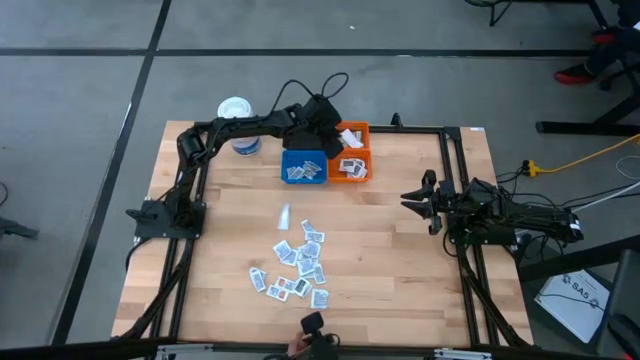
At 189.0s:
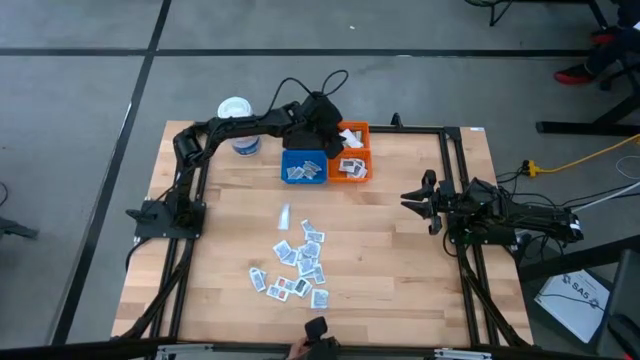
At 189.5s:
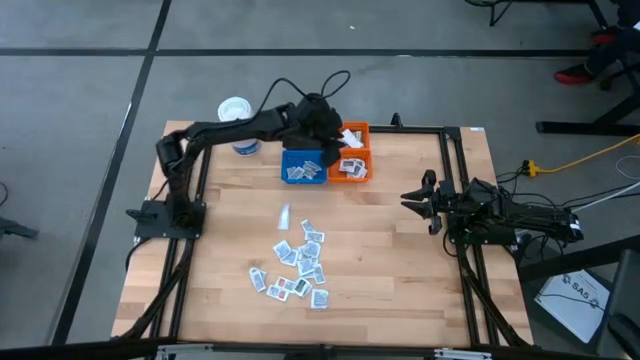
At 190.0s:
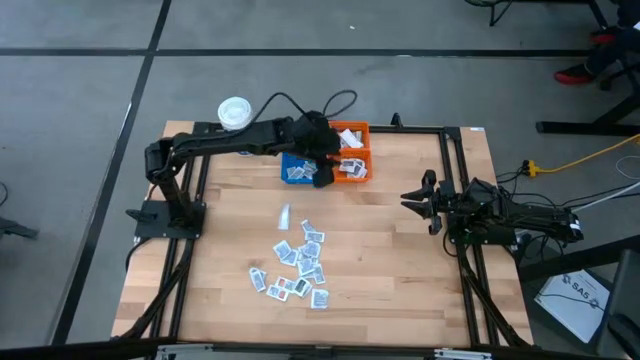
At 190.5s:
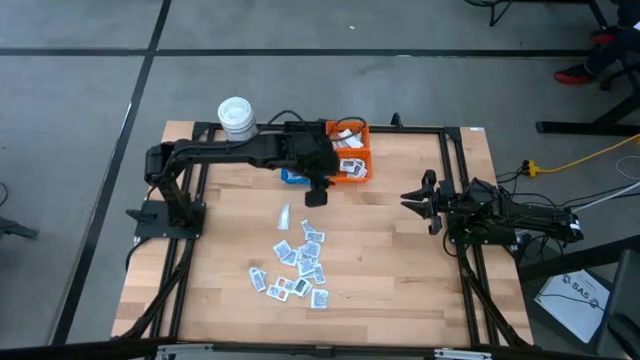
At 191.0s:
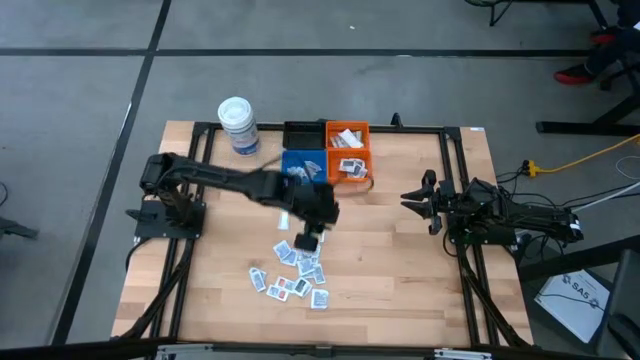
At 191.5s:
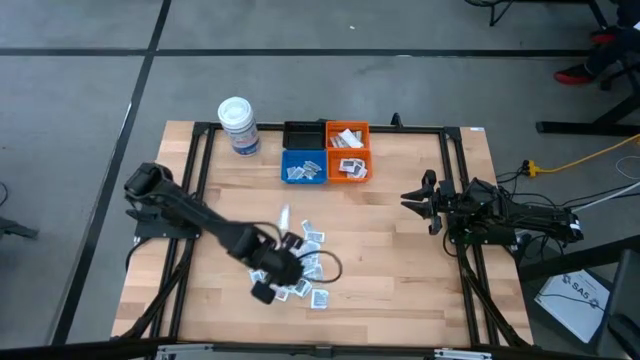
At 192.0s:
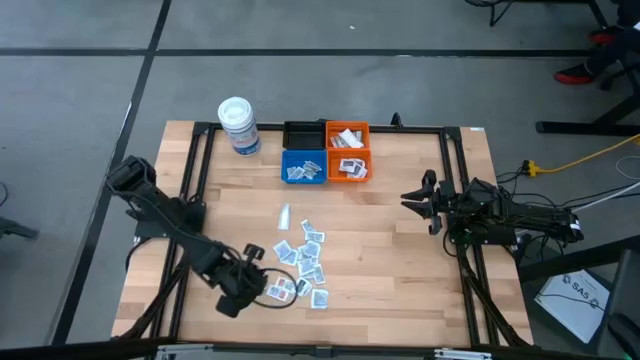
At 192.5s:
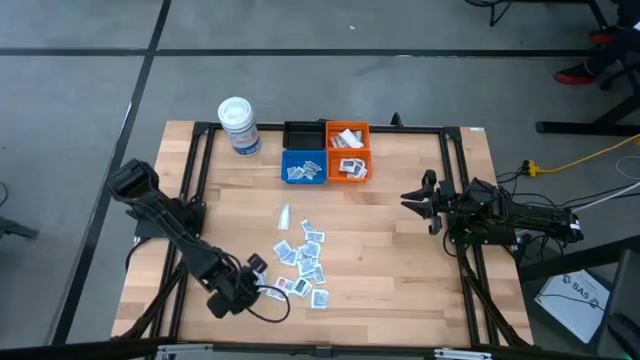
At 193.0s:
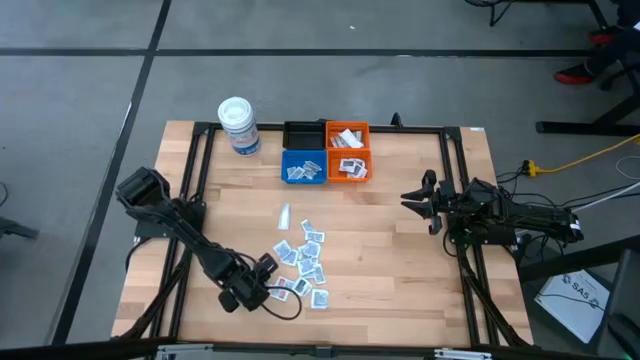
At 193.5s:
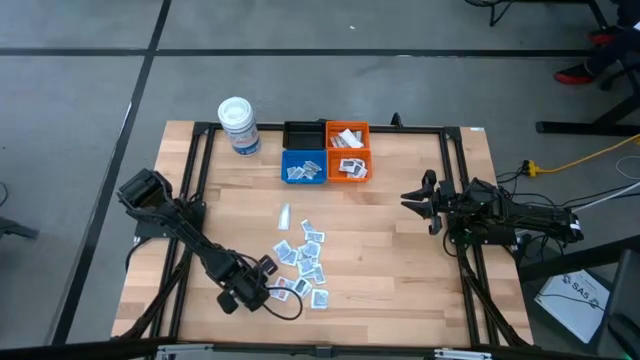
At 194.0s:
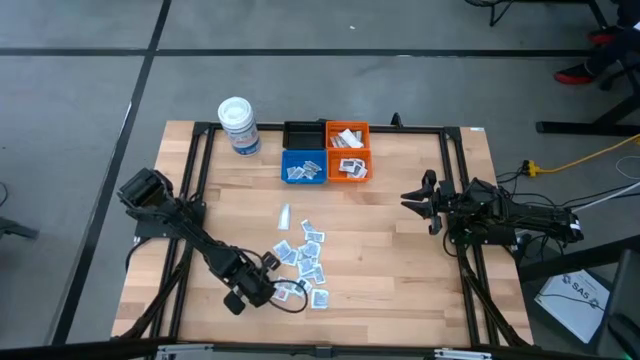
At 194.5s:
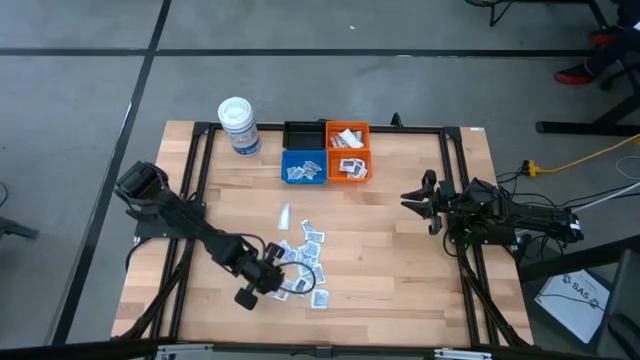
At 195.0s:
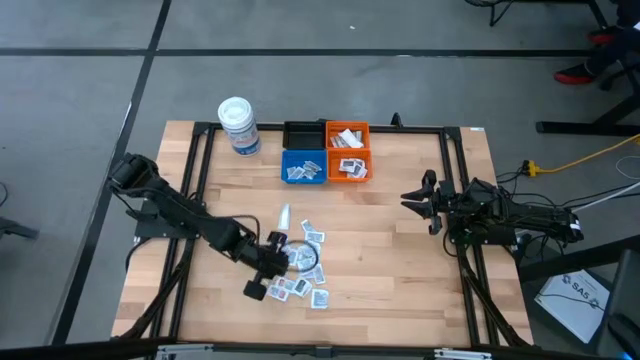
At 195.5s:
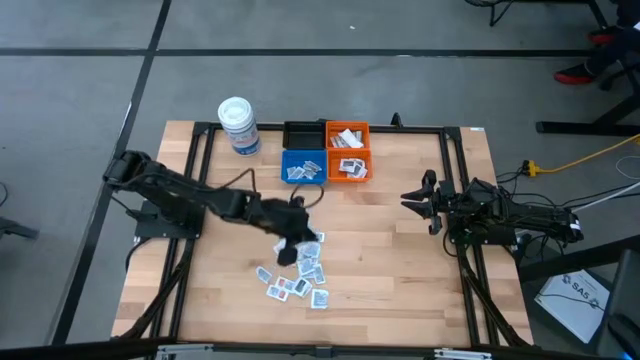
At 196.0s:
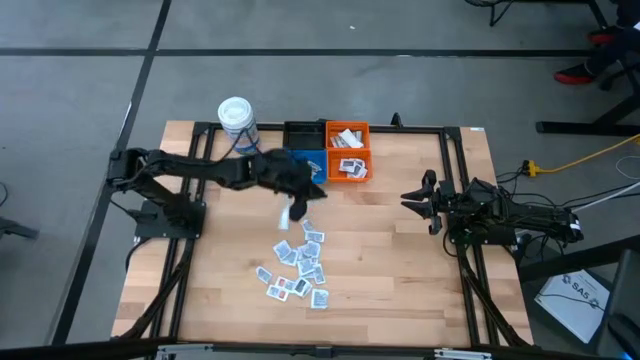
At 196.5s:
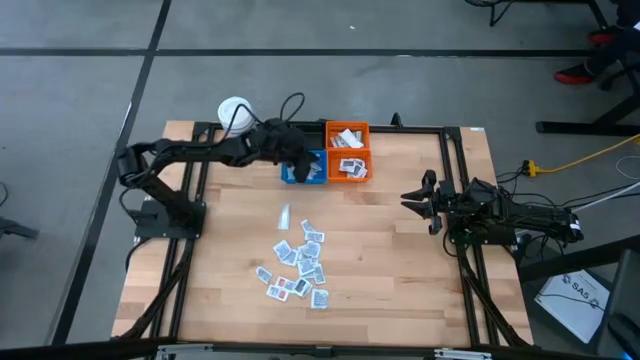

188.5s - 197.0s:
Task: Pick & Place First Aid Supplies
Put the ointment pack into the blue bin

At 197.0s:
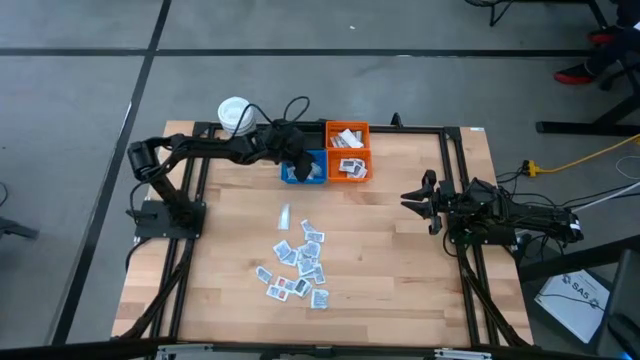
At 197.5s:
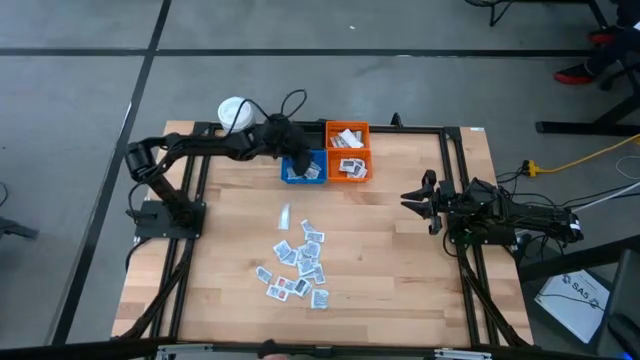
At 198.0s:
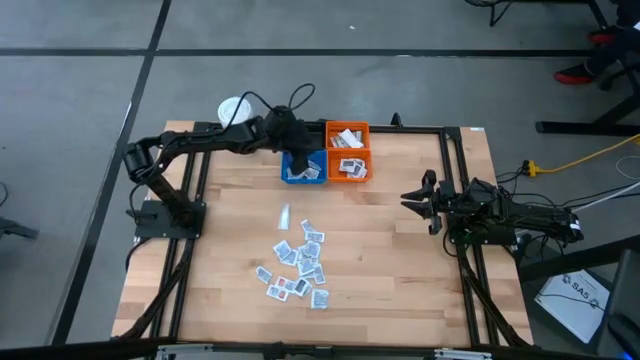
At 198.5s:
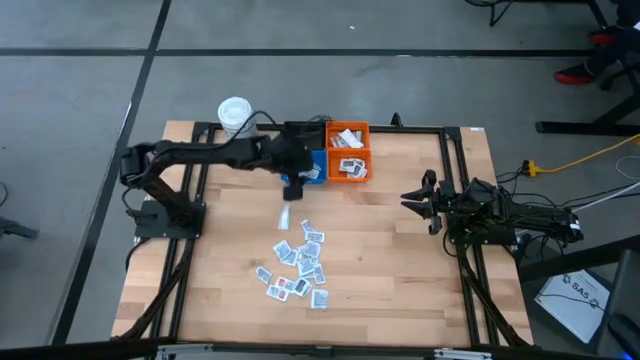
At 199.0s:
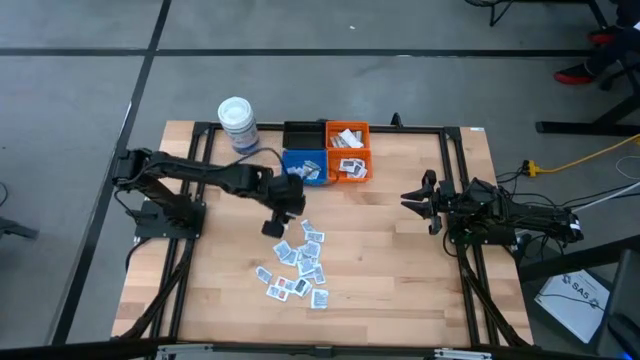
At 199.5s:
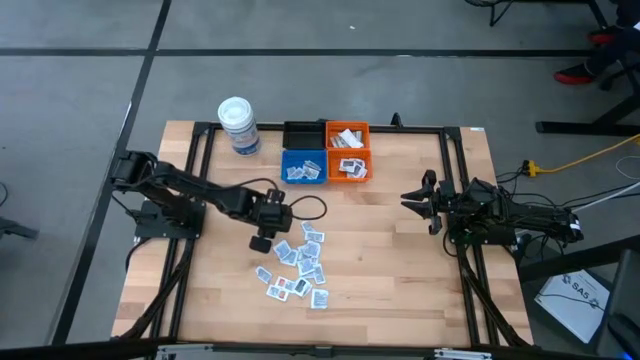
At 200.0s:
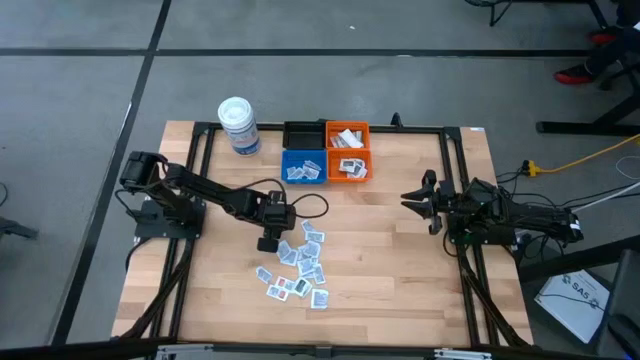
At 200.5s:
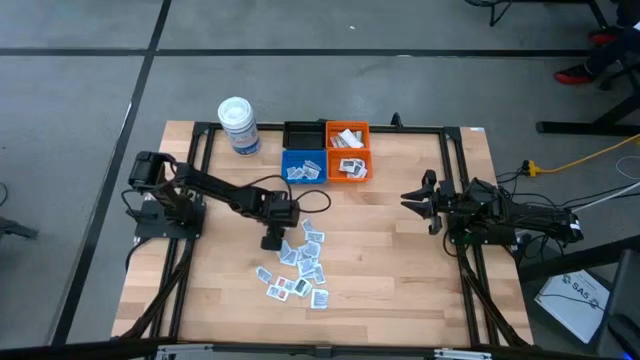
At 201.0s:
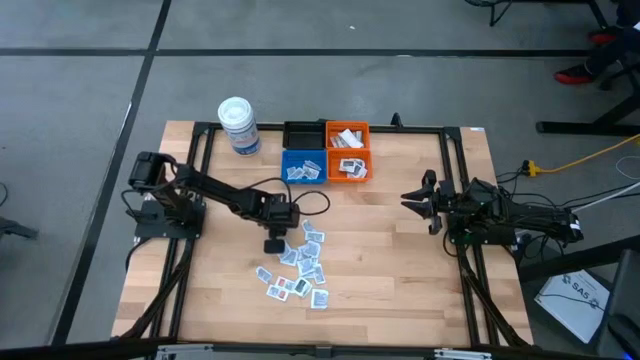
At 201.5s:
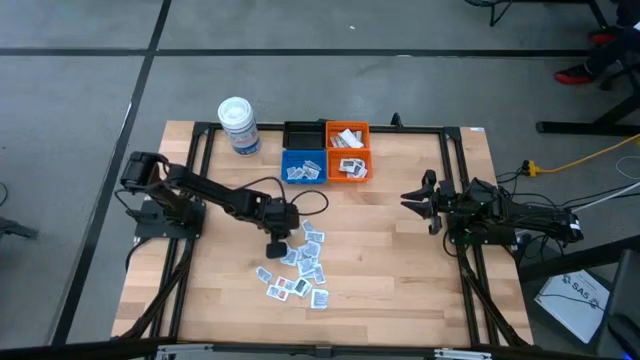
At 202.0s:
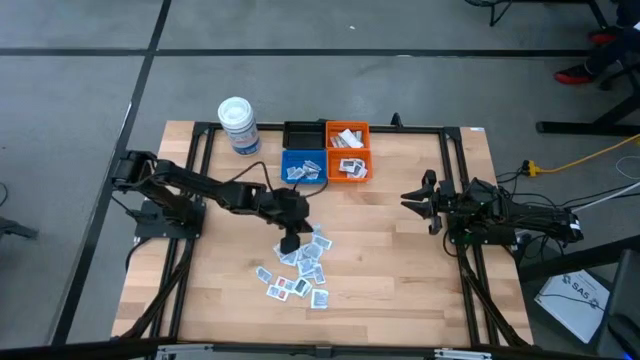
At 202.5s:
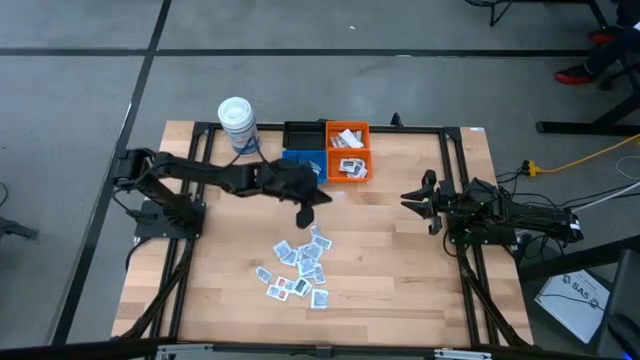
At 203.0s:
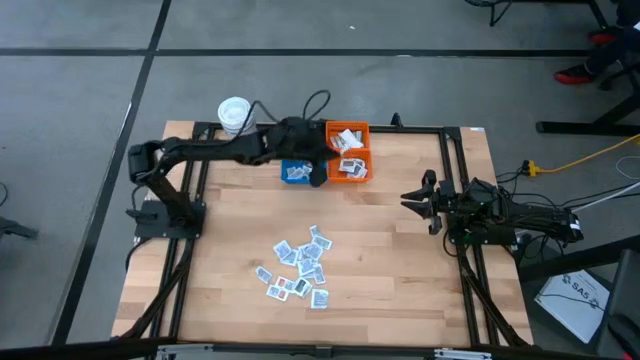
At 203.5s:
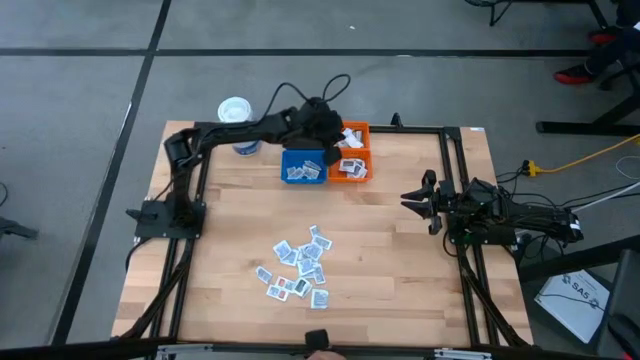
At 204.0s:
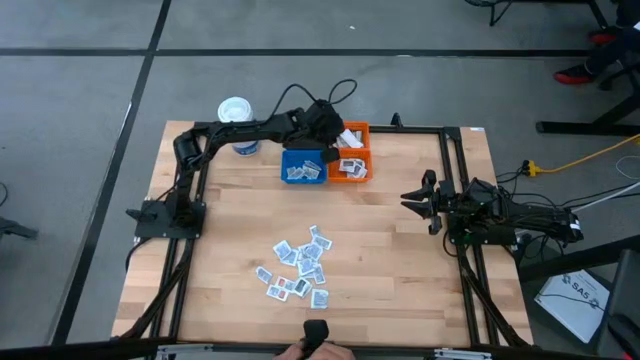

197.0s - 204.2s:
Put the bandage pack into the top orange bin

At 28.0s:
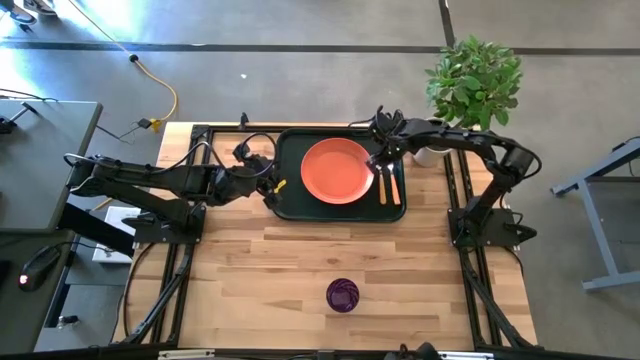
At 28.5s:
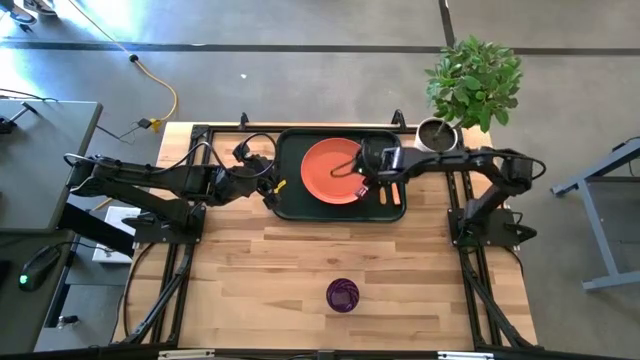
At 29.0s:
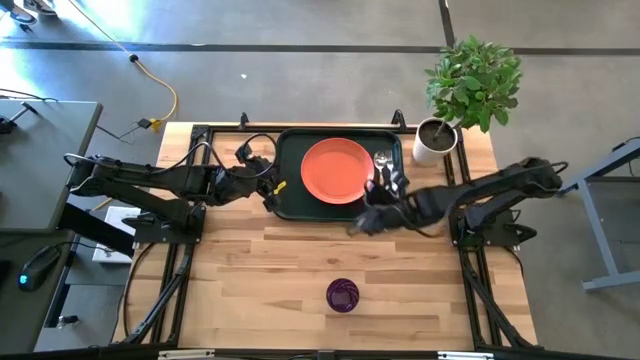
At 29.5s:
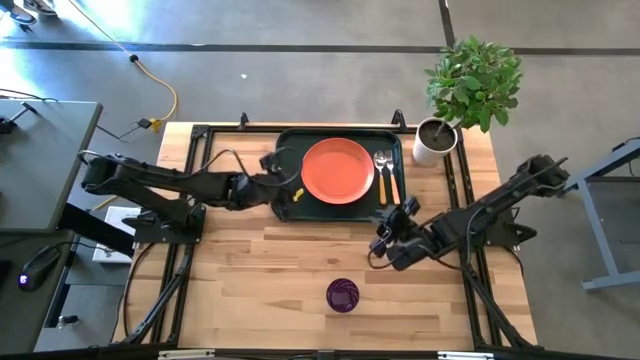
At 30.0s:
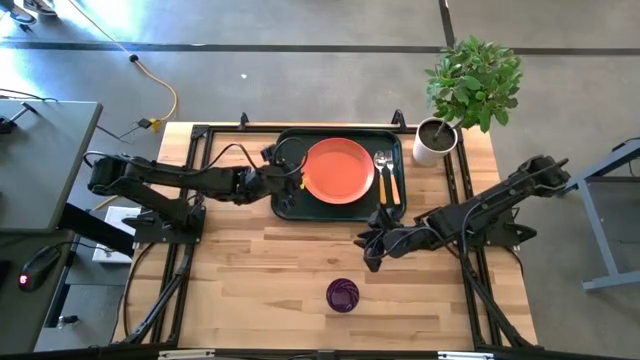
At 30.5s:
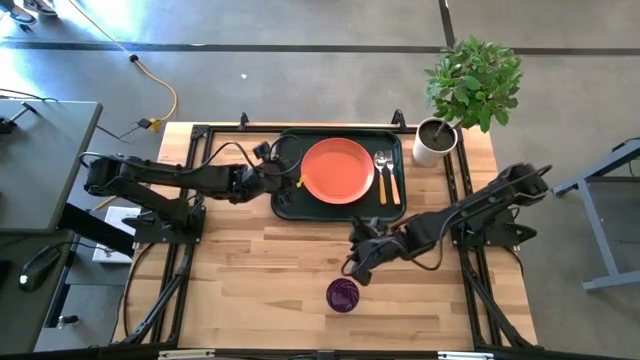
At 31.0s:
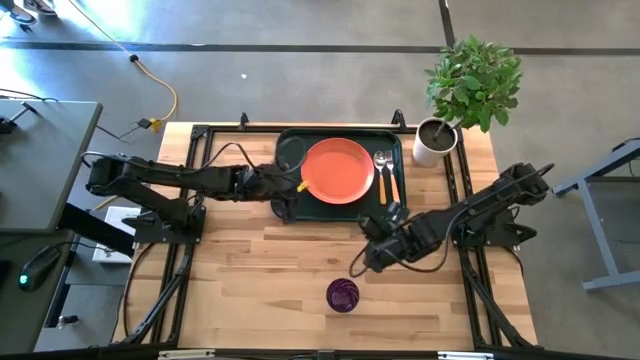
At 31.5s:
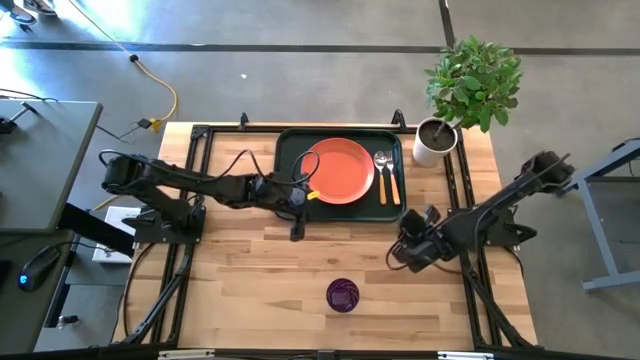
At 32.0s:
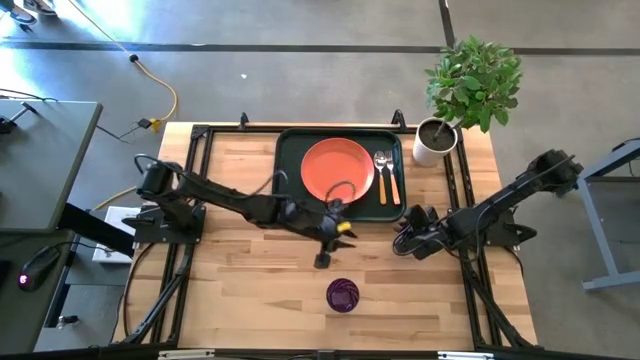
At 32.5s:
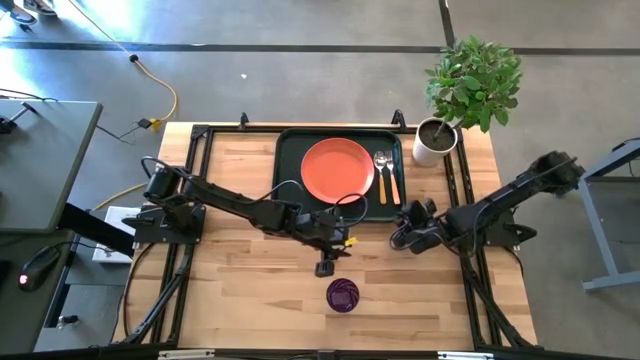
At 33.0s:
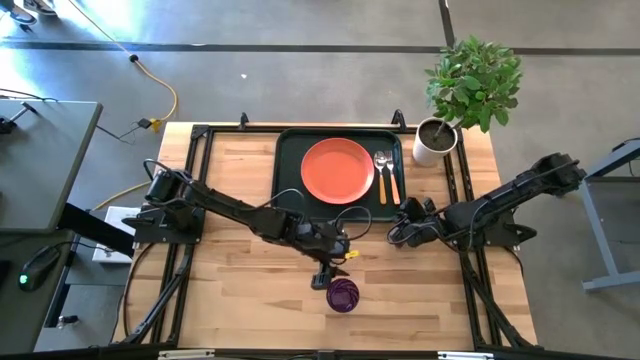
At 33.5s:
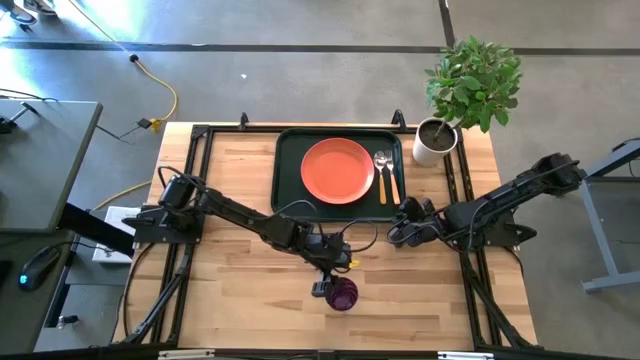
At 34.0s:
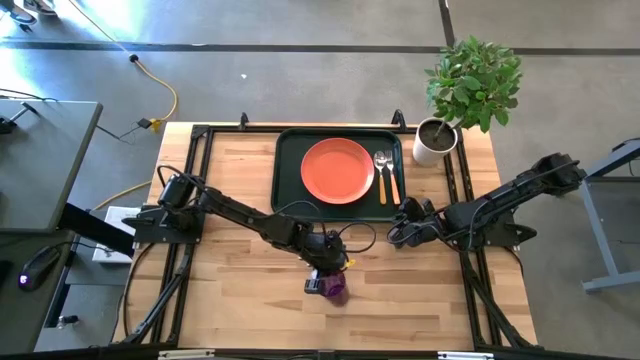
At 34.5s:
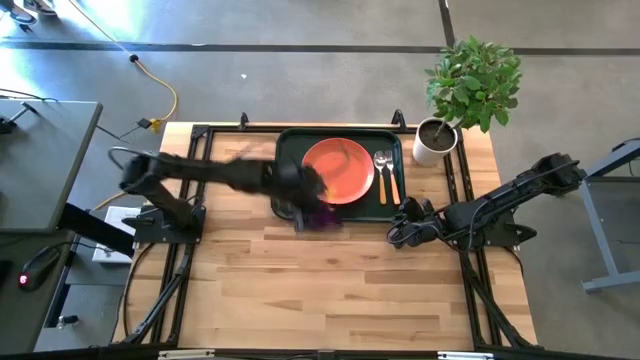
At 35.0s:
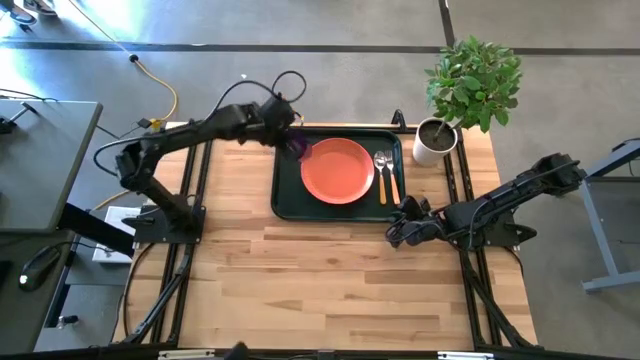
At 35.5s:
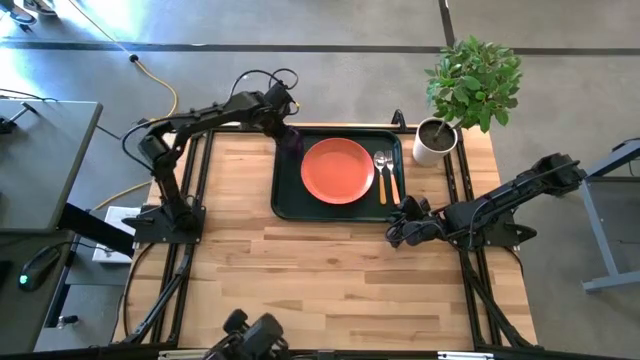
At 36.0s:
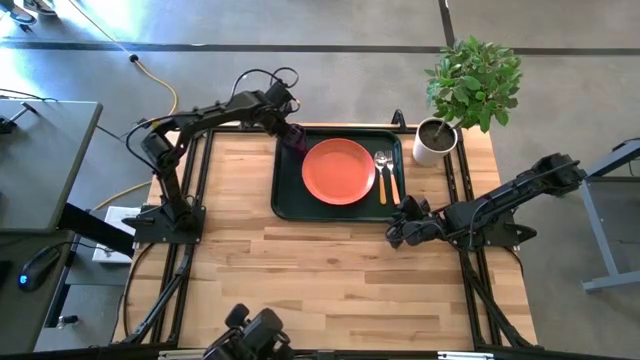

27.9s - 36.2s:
Task: Pick and place plate/cup/fork/spoon on tray
Put the purple cup on the dark green tray to the top left of the orange plate
